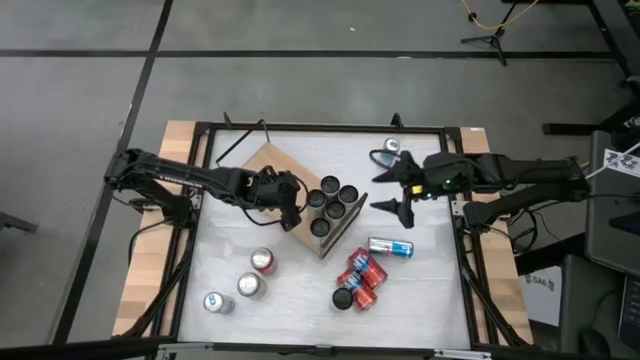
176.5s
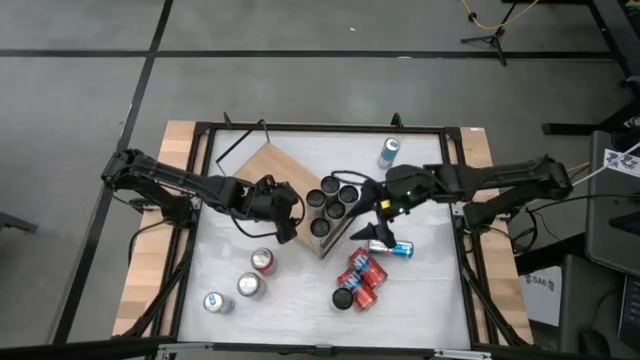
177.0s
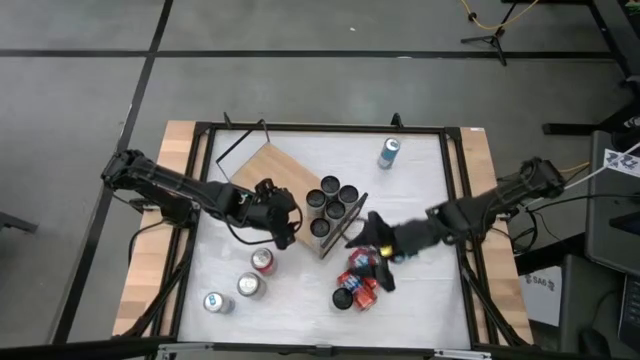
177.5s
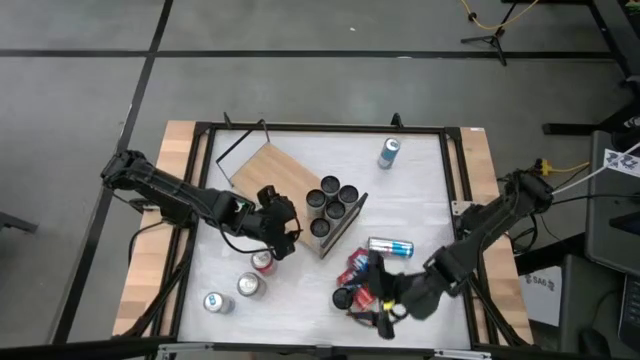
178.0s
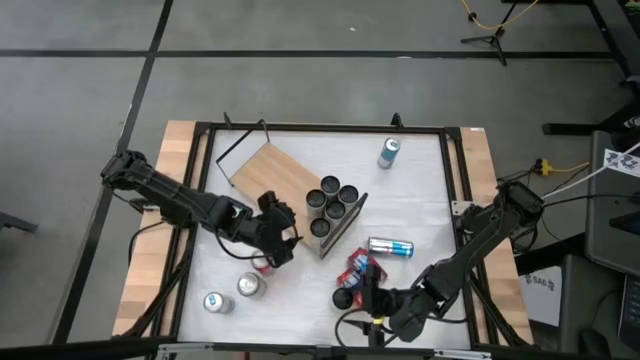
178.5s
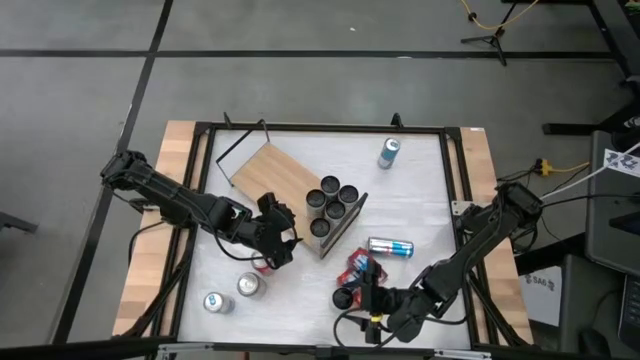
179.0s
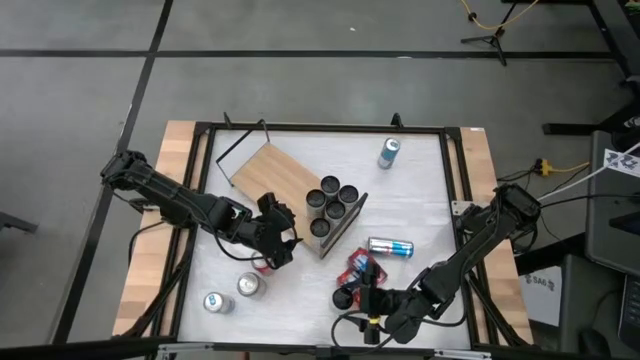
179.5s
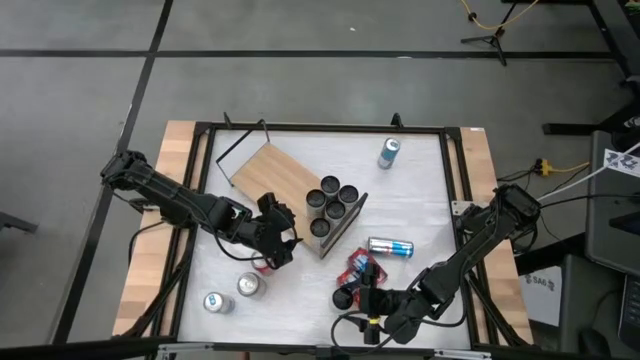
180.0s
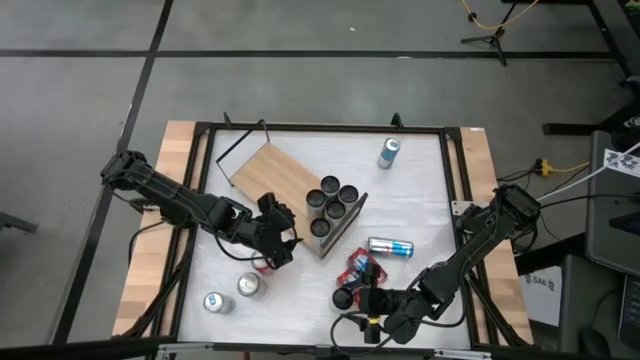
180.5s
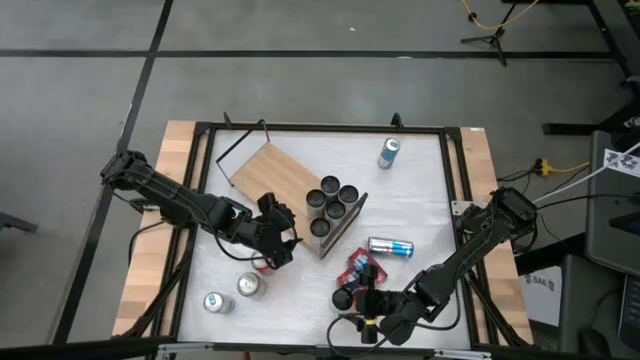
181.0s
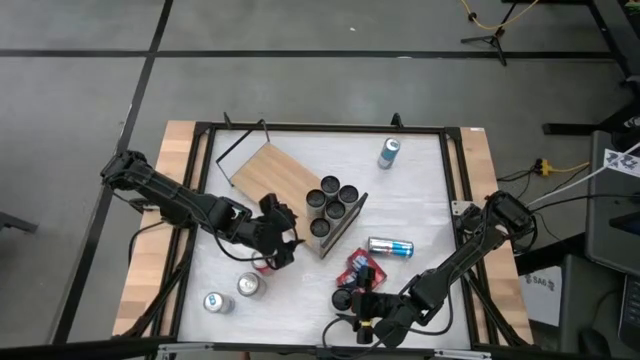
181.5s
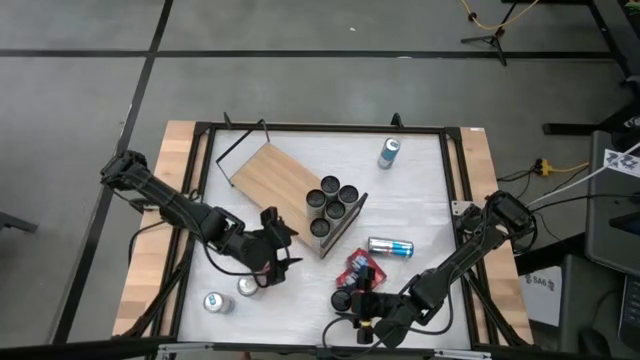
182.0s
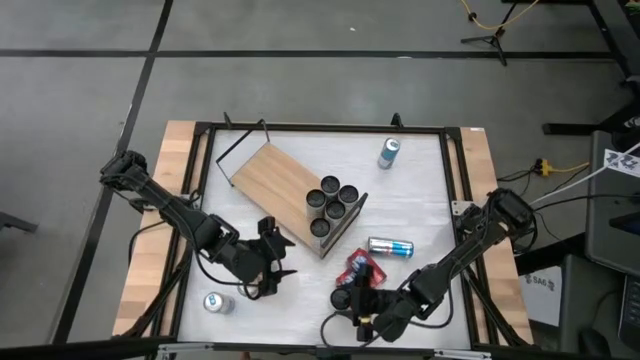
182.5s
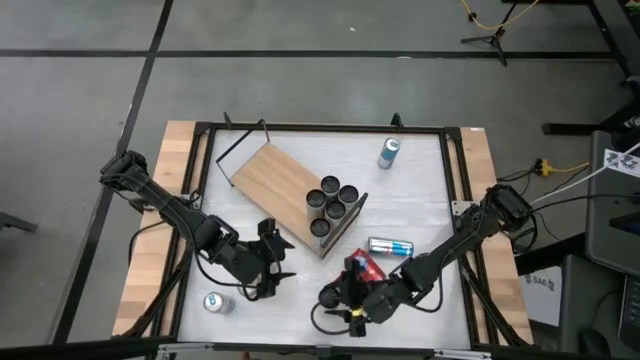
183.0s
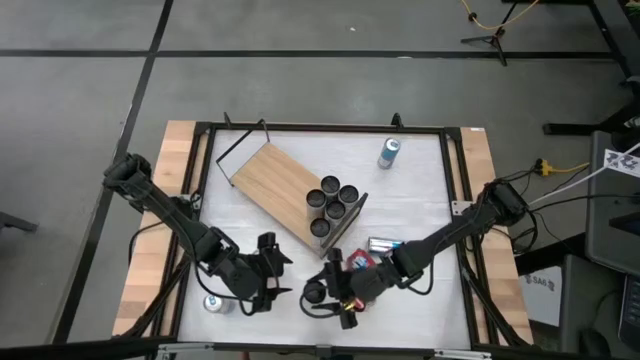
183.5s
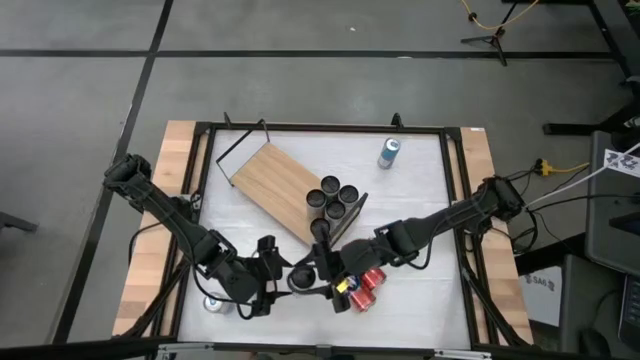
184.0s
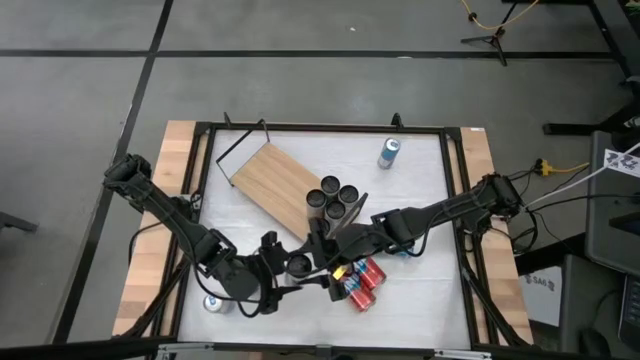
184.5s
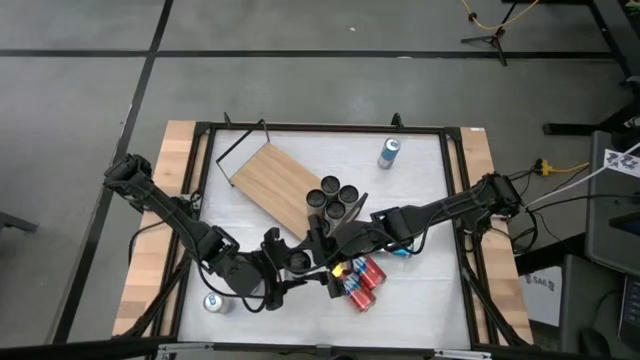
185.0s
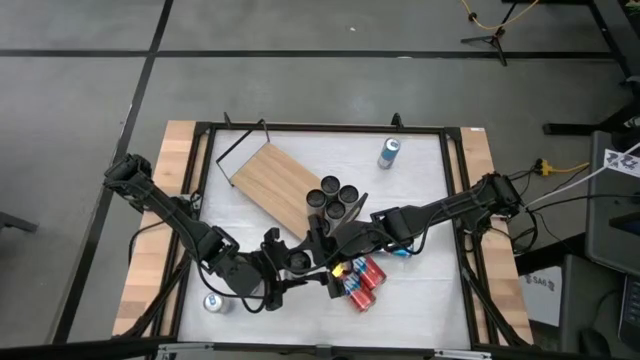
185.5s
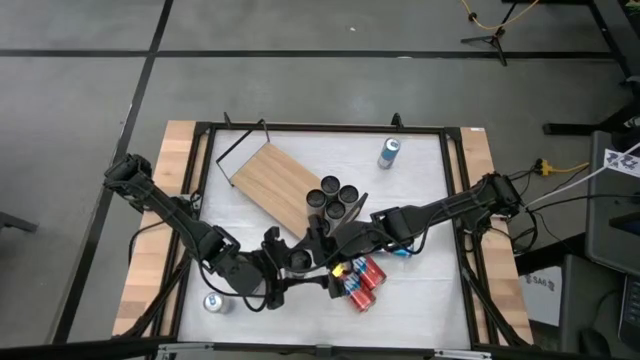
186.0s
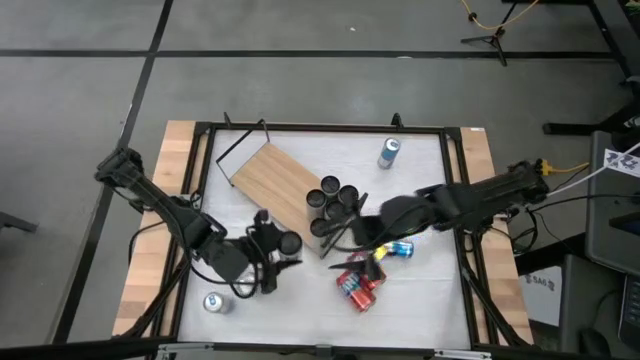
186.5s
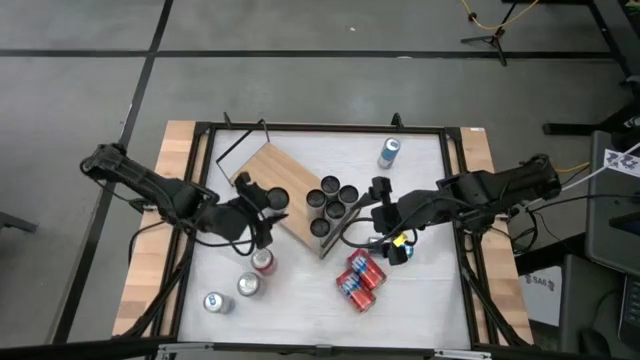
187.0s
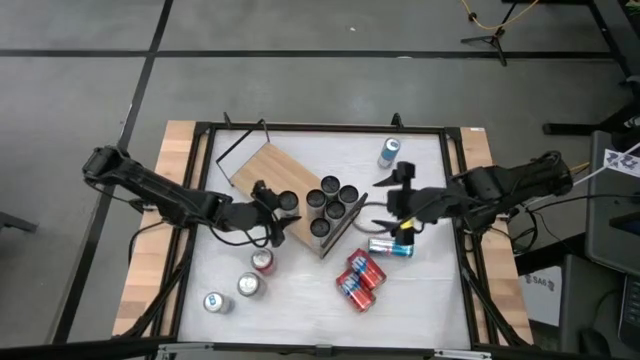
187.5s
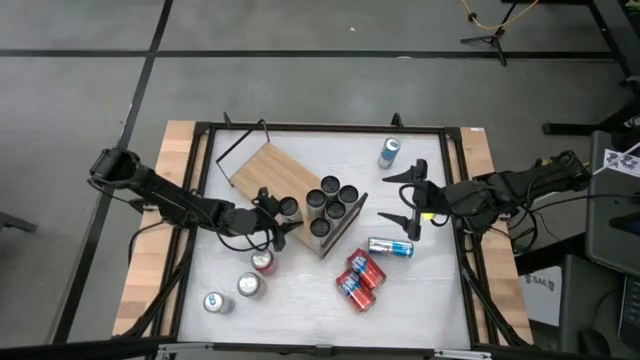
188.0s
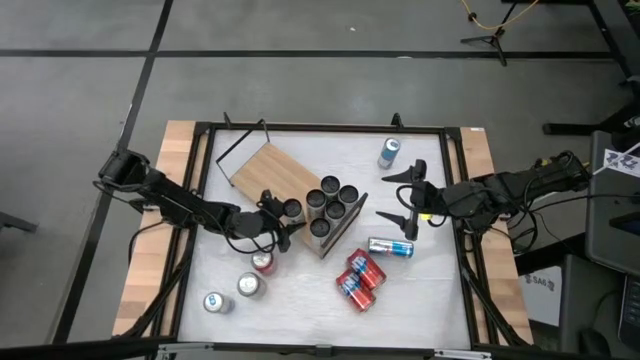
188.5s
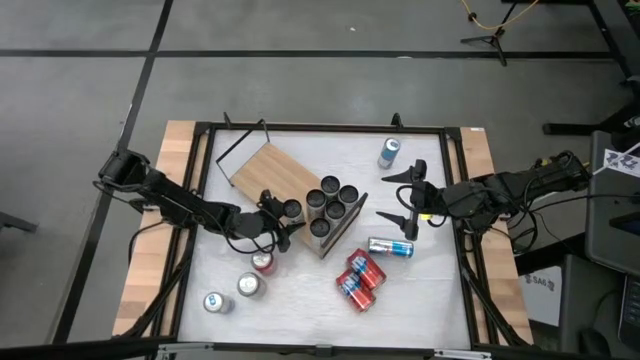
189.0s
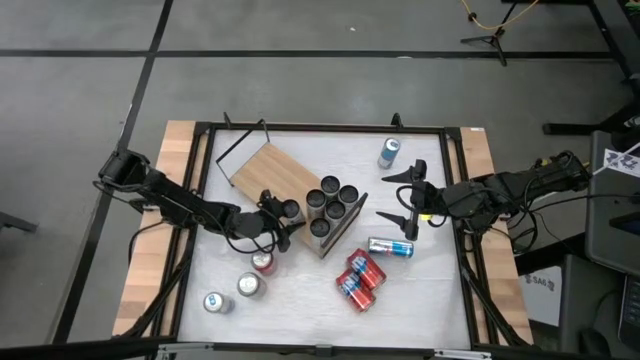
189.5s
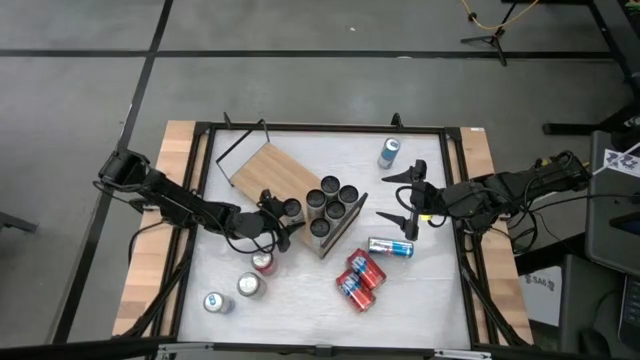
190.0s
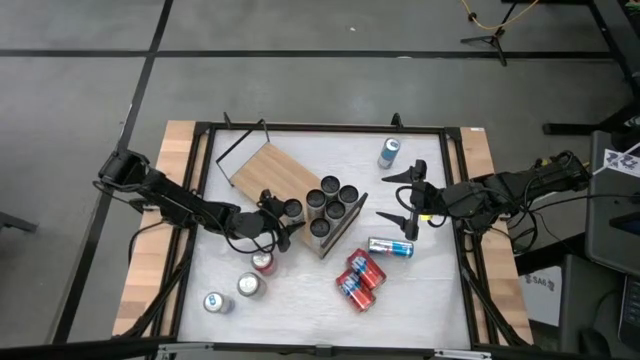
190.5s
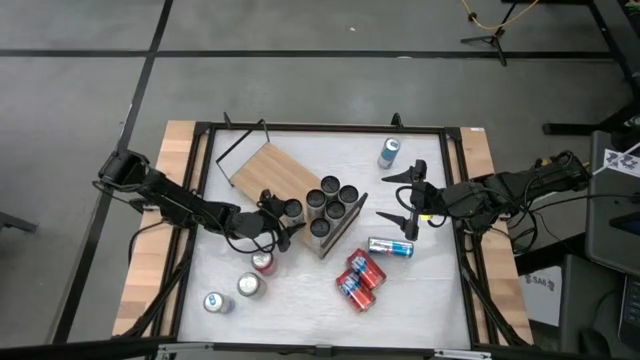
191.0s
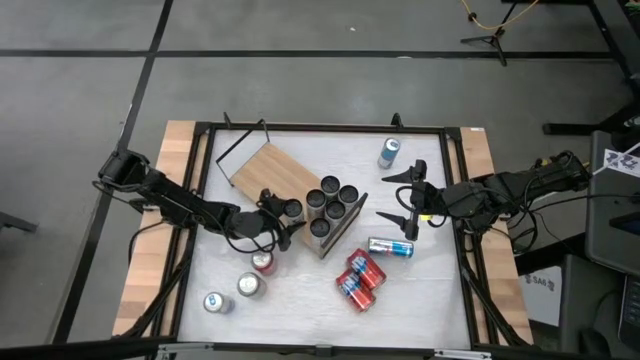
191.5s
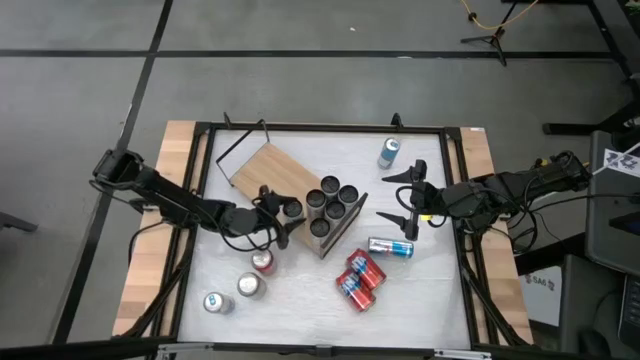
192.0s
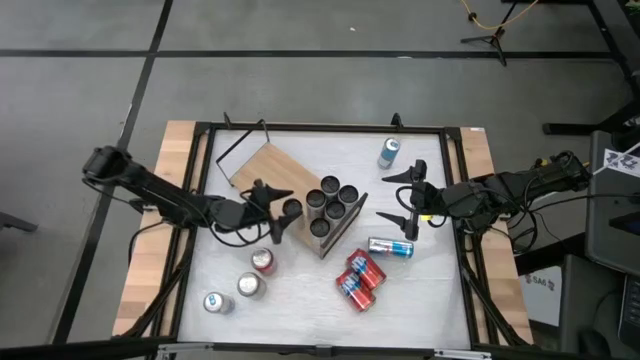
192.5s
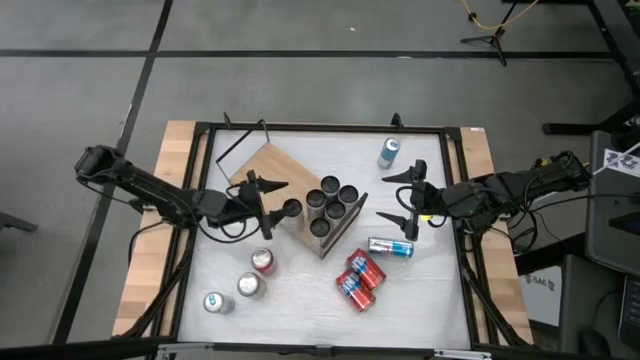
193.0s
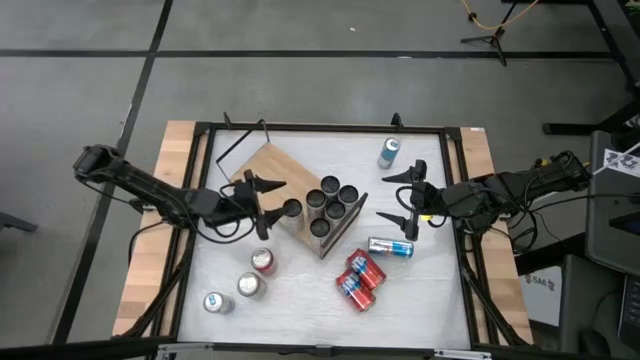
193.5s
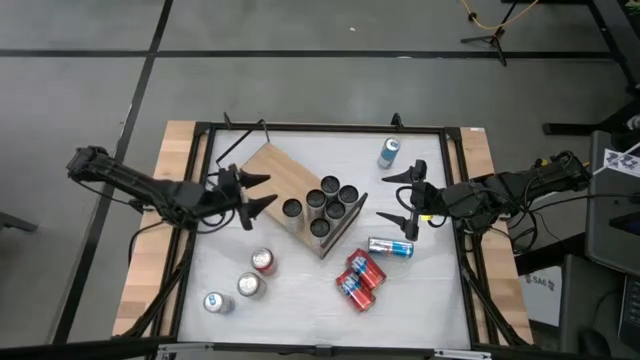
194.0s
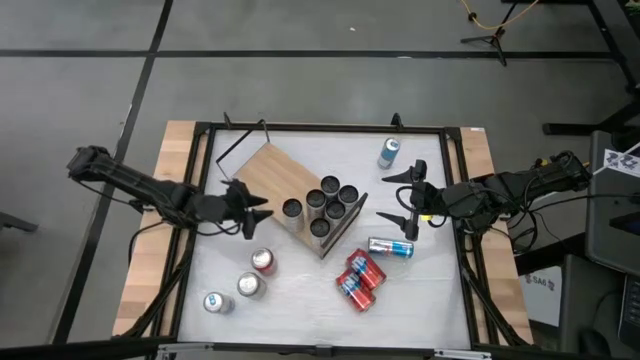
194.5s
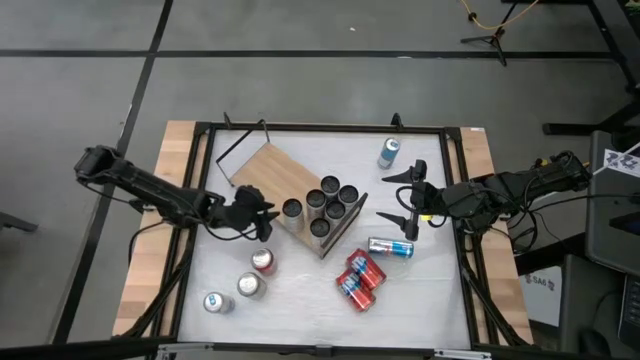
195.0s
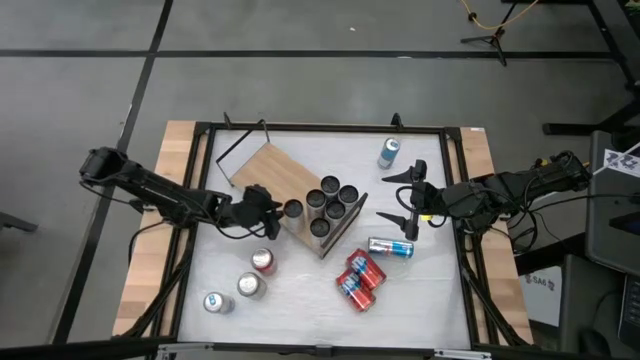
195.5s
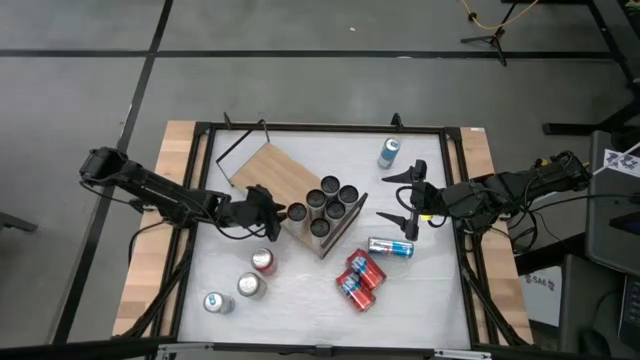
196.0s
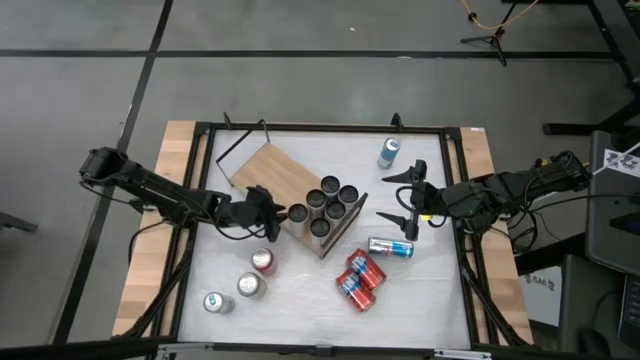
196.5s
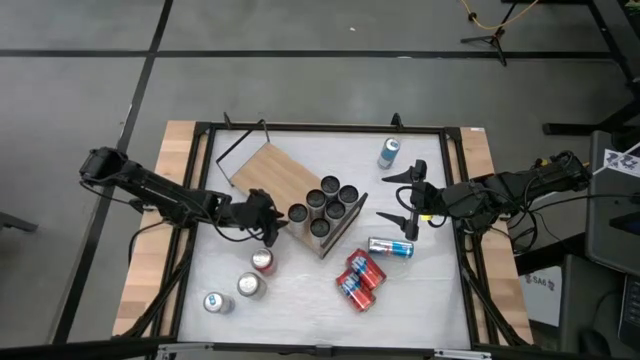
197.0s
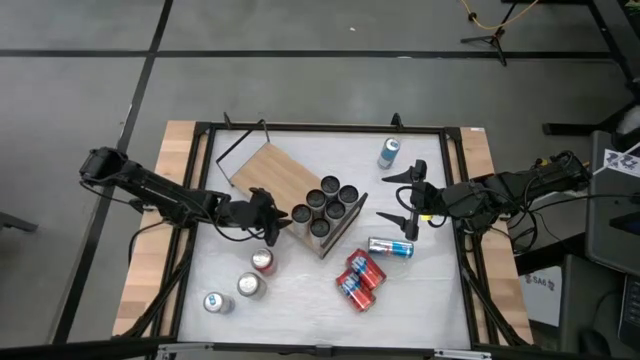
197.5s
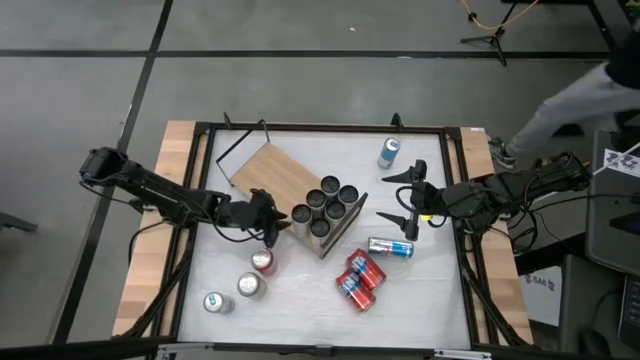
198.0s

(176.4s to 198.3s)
Task: Place canned beverage on shelf
Put the white-yellow soda can on the shelf aligned with the other white-yellow soda cans
